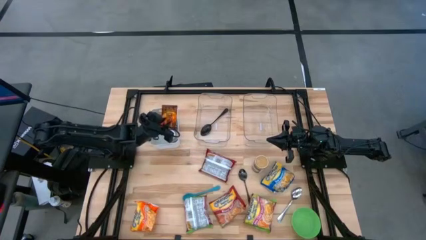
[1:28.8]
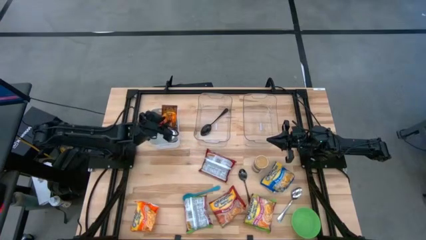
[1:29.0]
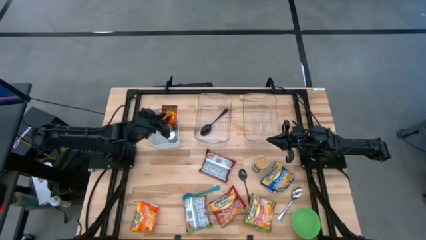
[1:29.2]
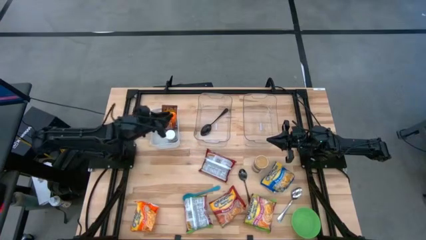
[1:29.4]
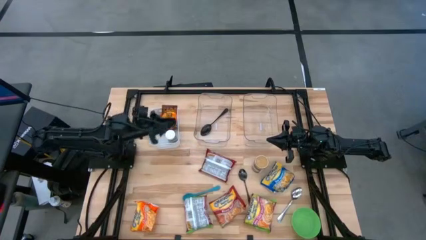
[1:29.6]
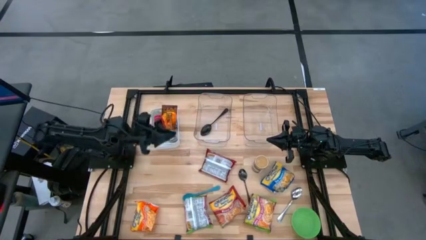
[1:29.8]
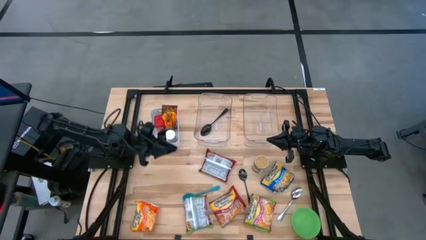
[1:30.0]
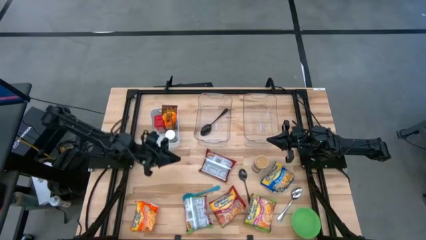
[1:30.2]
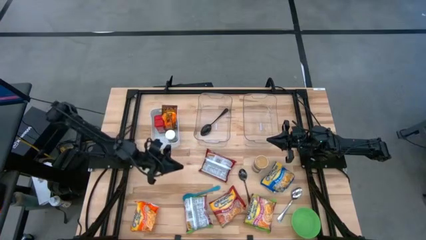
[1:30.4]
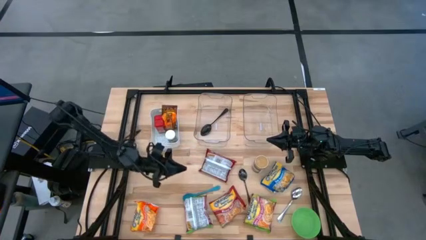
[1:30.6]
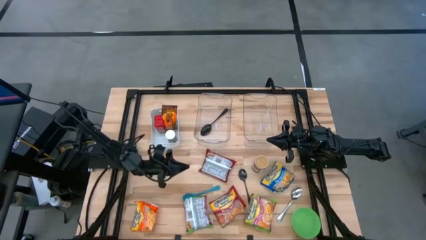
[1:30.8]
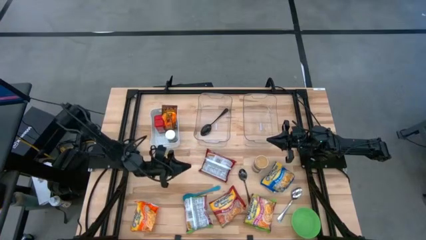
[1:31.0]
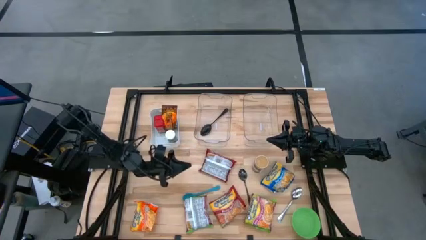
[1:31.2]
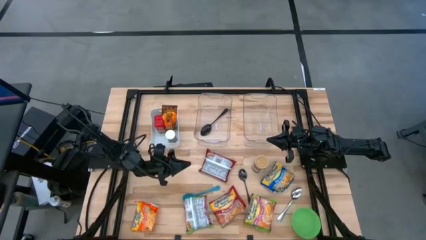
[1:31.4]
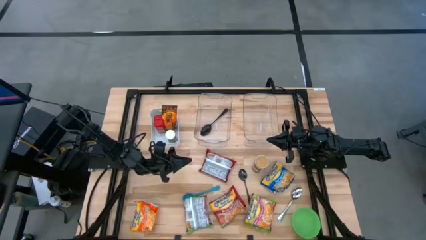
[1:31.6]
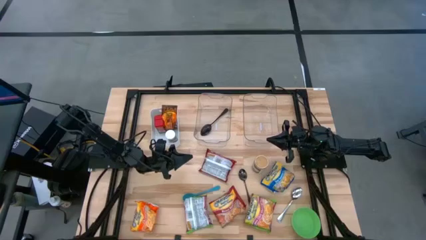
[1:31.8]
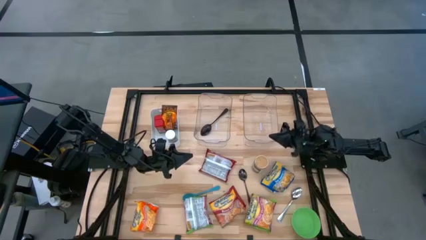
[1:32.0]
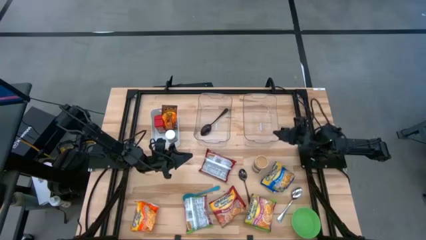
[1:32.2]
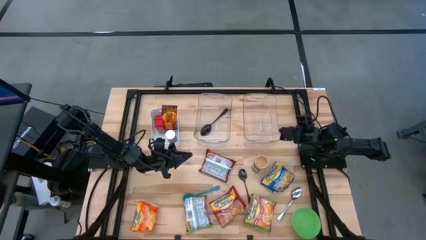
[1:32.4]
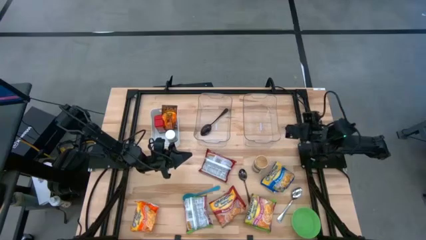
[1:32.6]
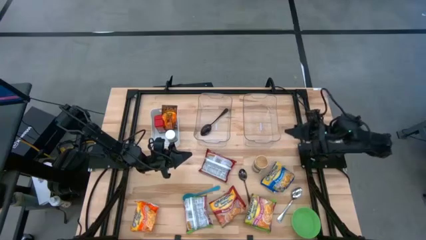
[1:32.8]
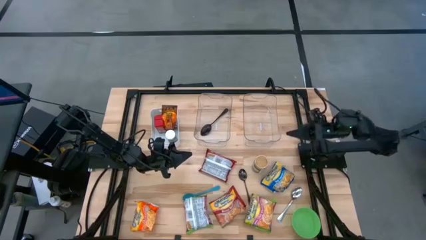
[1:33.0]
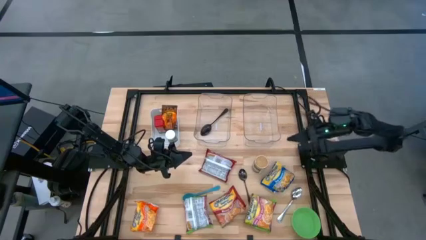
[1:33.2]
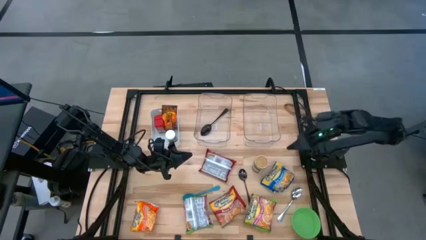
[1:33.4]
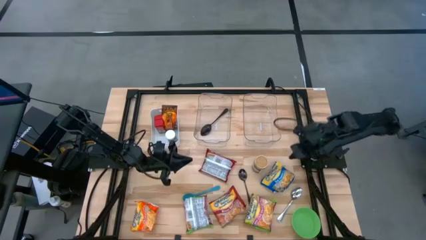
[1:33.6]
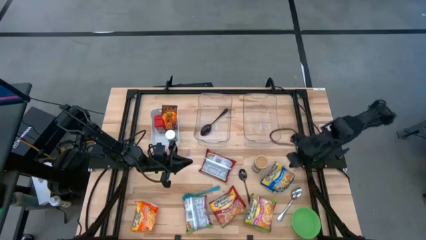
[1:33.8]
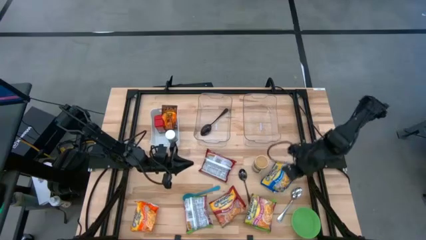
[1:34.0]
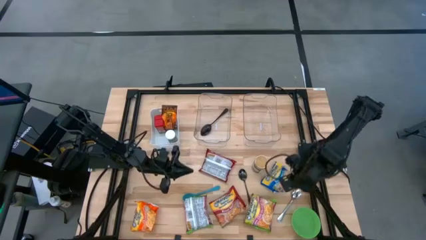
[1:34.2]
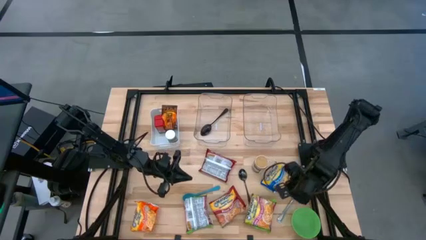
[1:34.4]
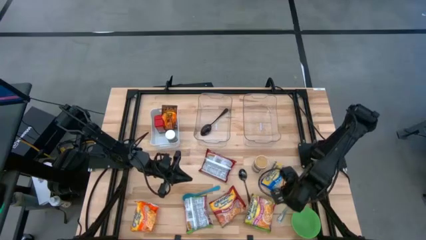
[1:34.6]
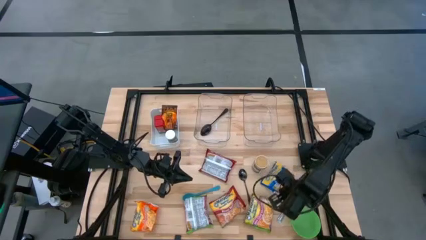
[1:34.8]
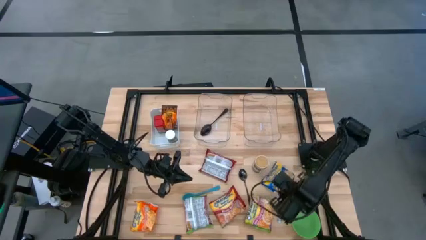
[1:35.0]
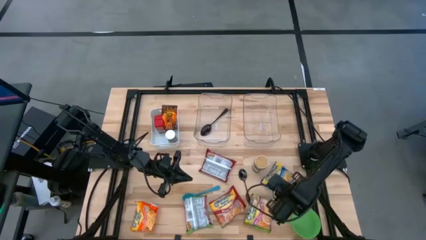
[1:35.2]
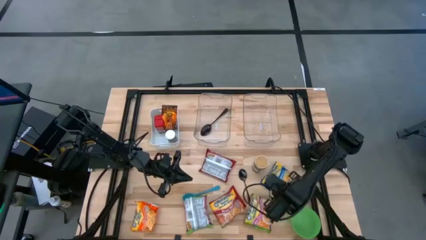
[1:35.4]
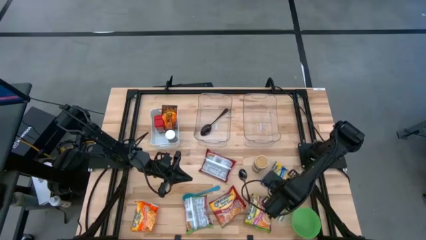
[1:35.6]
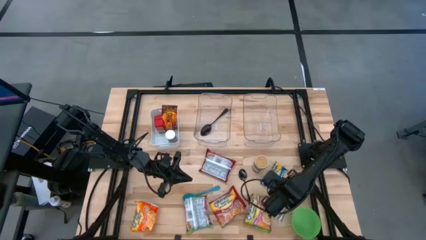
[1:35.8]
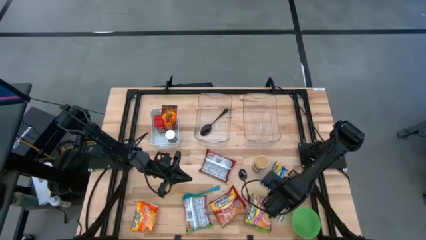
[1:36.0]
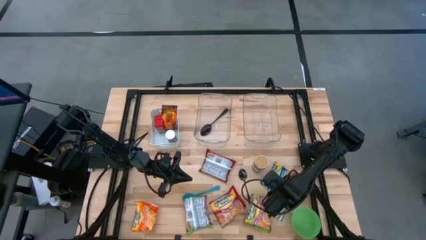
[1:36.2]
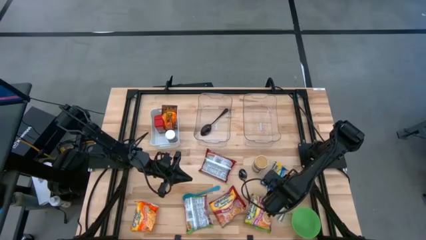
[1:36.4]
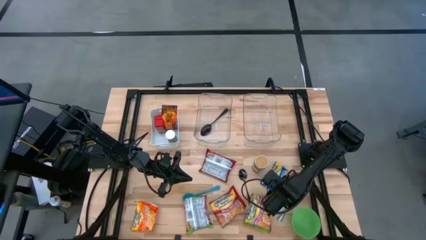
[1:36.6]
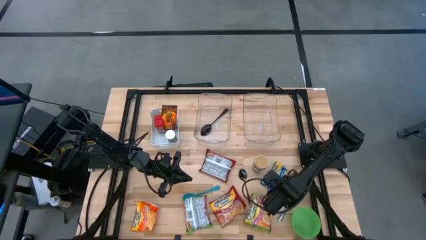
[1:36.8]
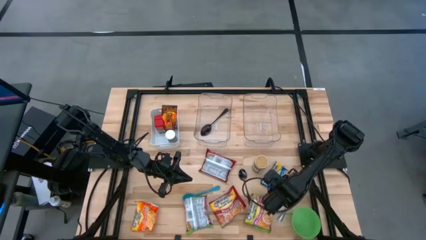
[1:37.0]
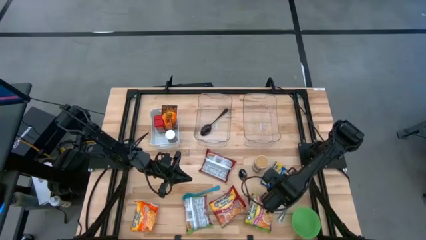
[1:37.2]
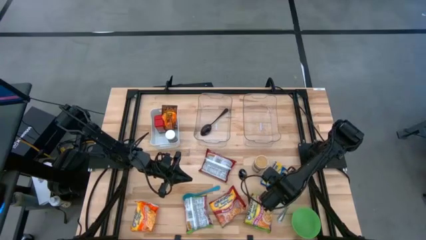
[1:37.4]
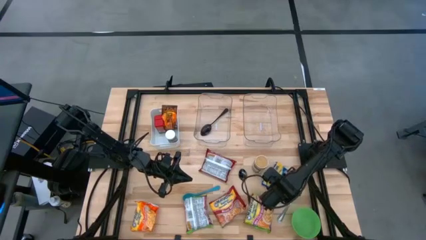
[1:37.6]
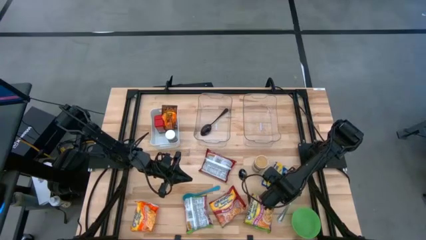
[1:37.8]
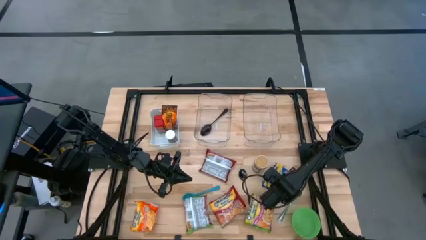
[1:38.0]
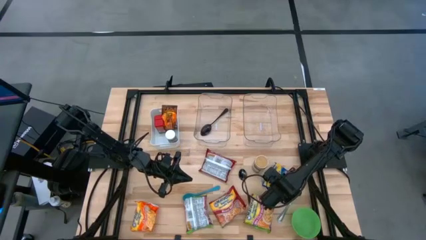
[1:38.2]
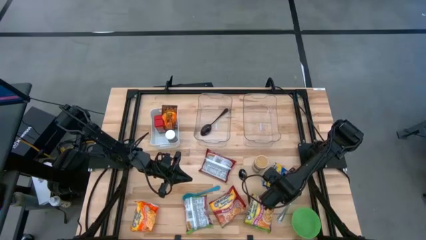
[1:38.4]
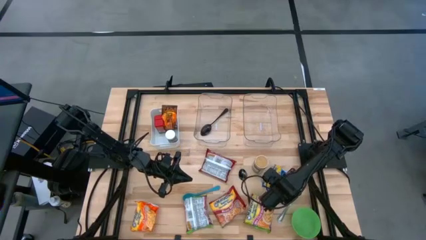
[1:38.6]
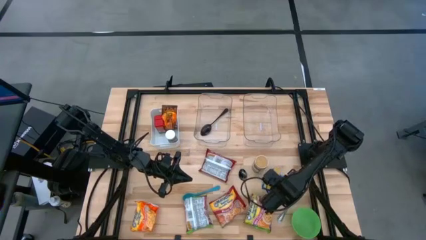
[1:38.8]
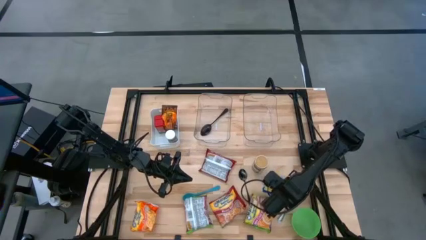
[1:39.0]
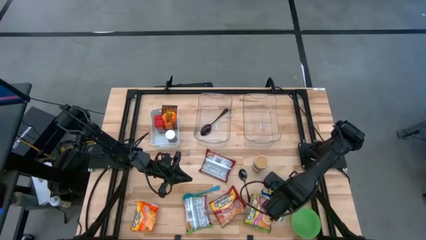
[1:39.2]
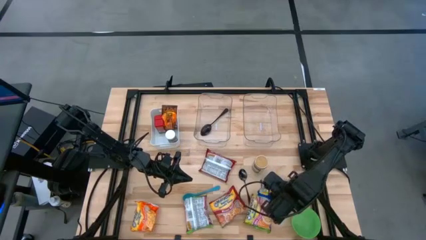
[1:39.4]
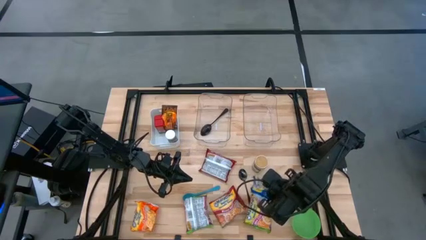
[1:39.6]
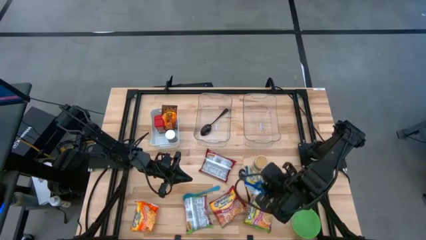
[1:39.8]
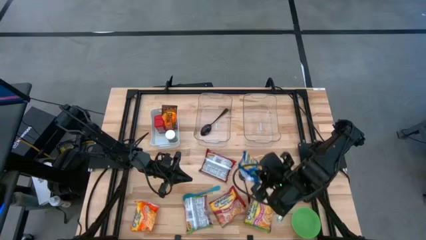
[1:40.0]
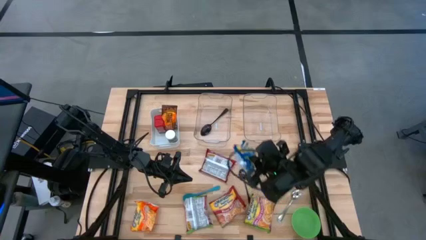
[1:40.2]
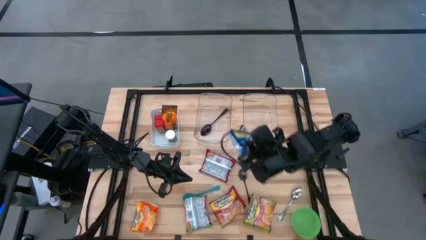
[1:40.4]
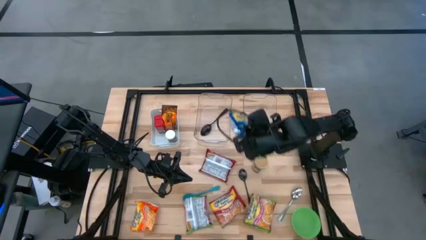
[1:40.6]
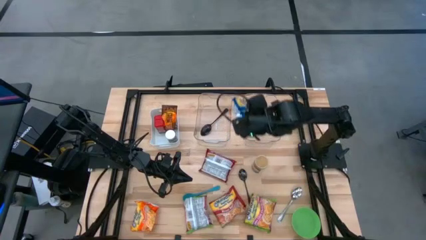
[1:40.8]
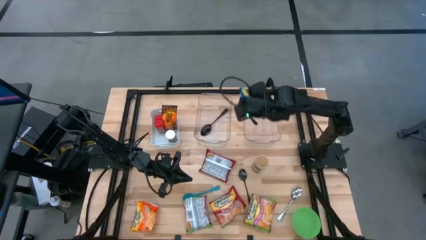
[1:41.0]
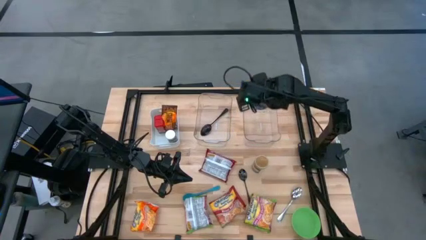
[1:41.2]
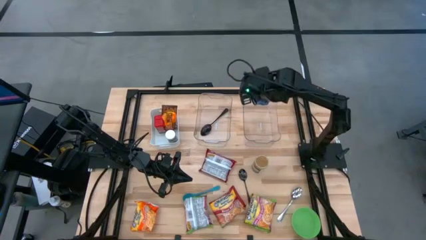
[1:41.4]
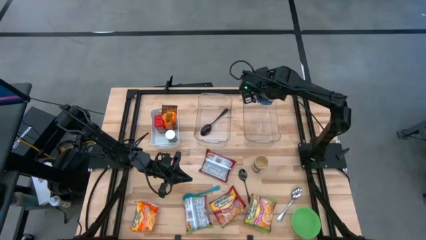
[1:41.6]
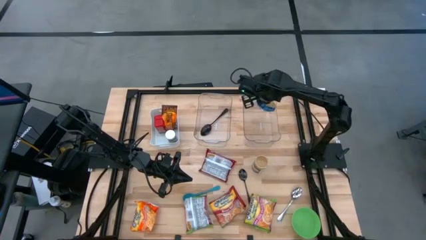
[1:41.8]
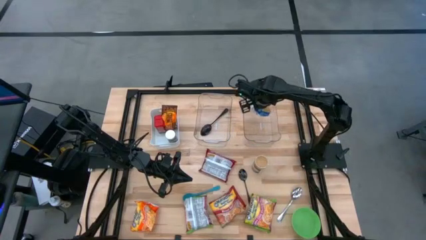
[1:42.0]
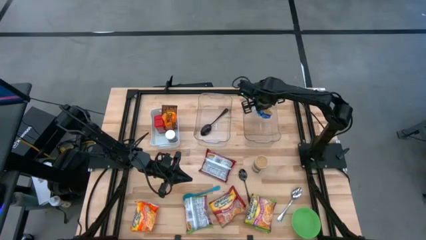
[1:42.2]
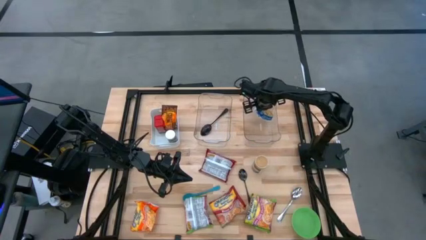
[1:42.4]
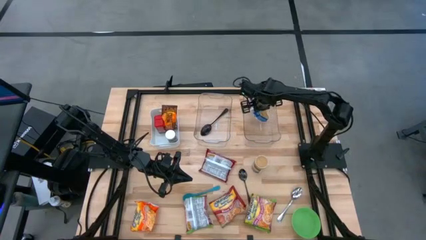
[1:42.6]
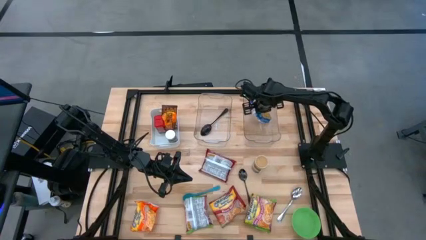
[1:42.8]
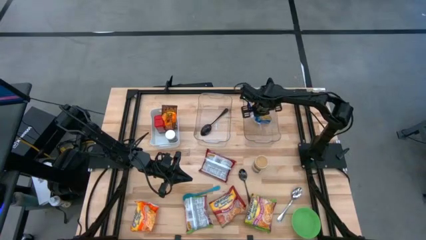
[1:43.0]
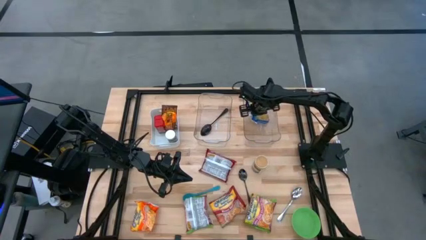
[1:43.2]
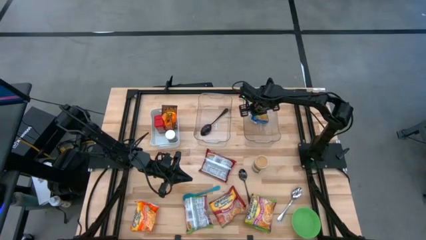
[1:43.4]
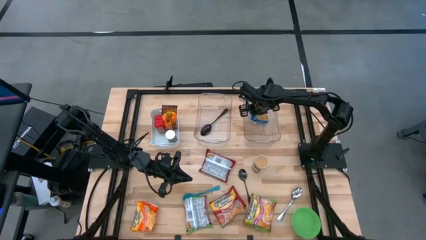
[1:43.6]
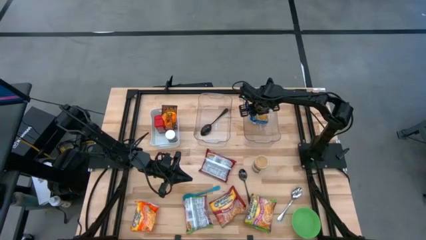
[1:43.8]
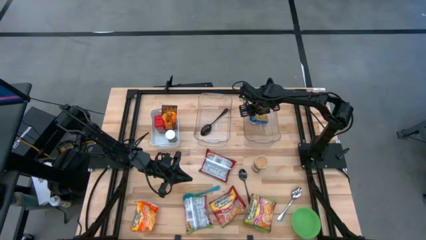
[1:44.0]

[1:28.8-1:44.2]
Task: Pick & Place Food Item
Put the blue noodle pack into the right transparent bin
